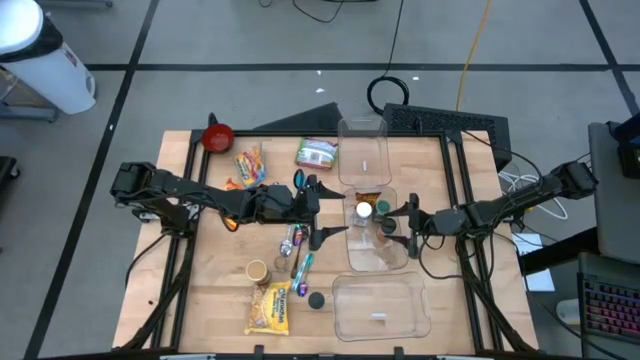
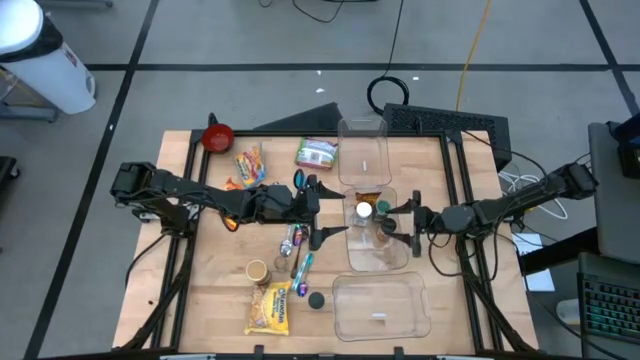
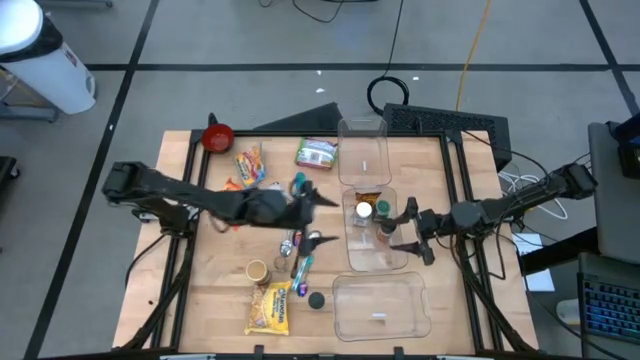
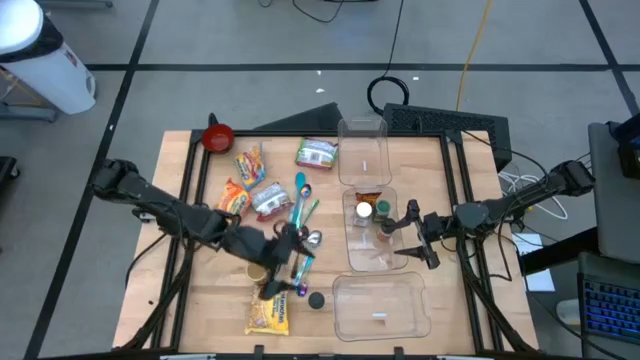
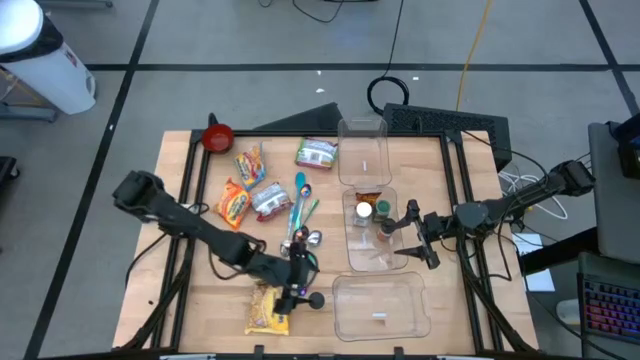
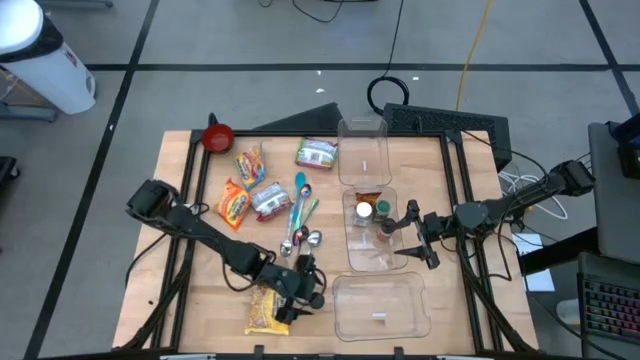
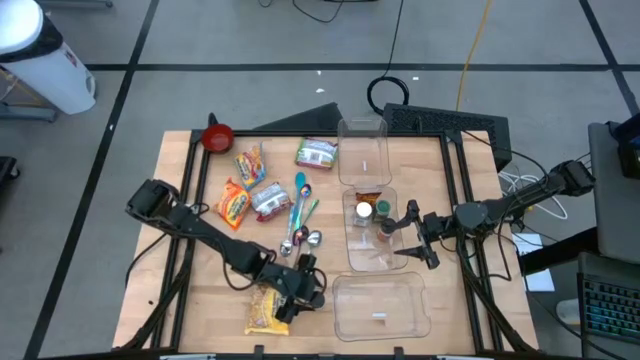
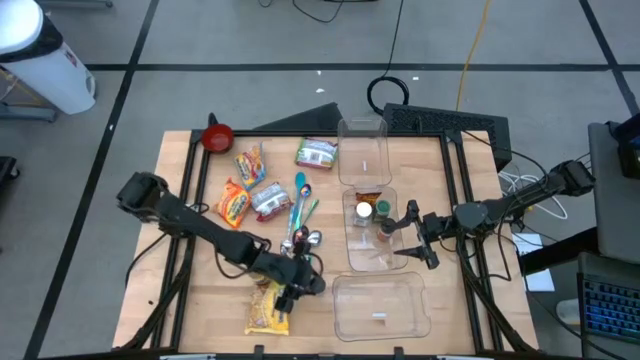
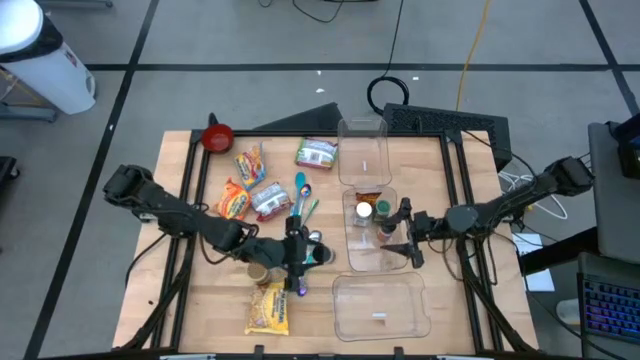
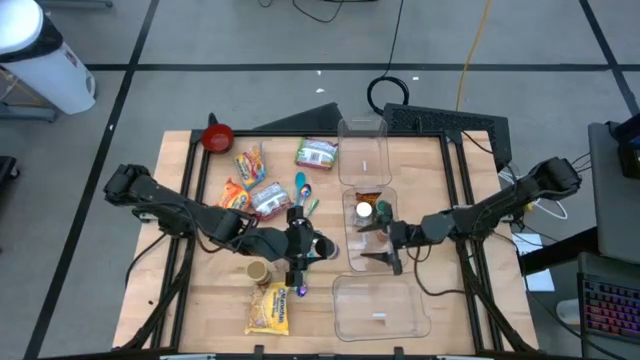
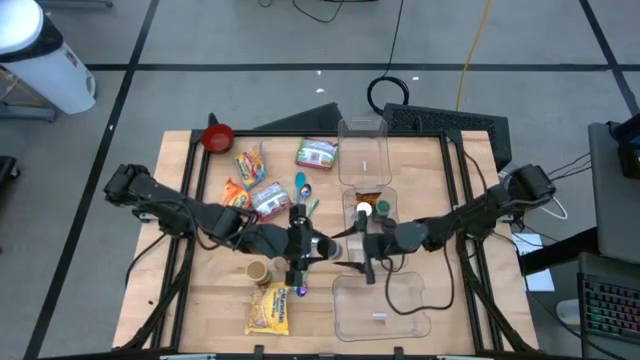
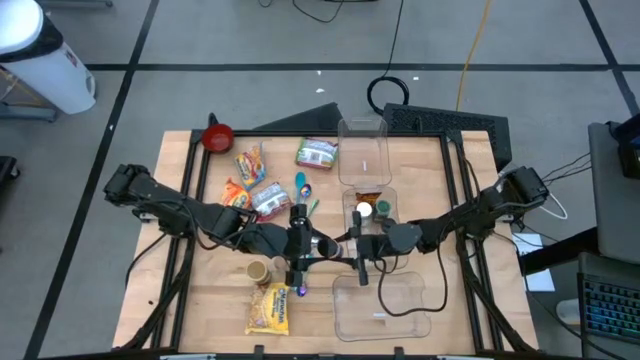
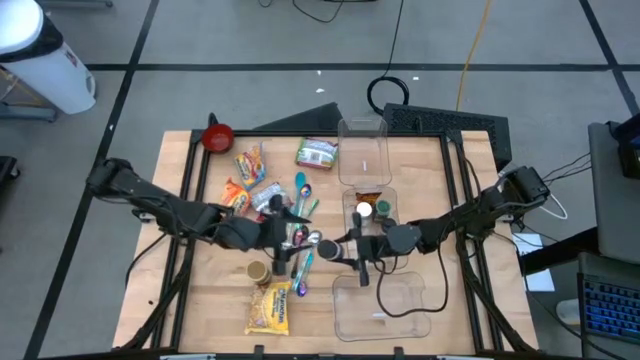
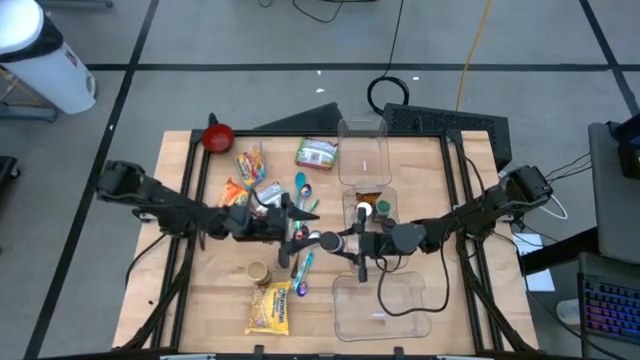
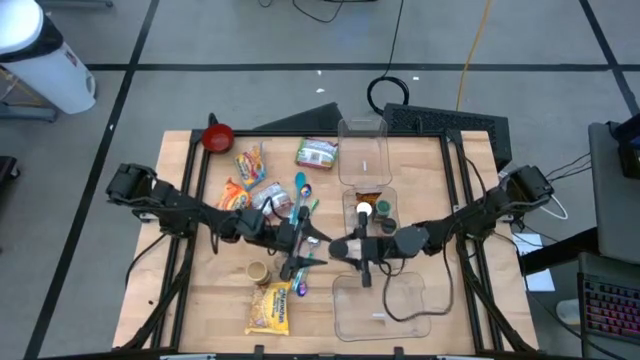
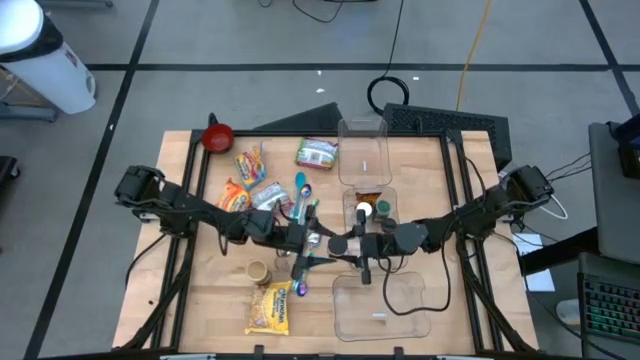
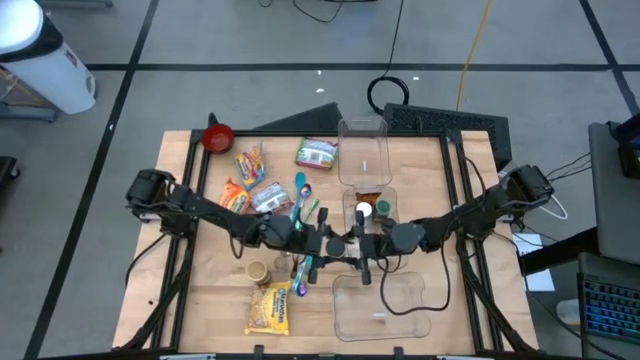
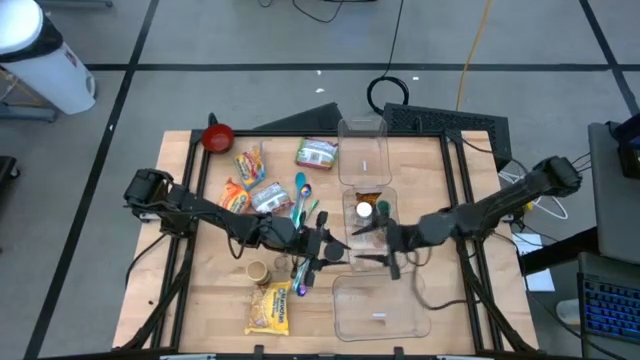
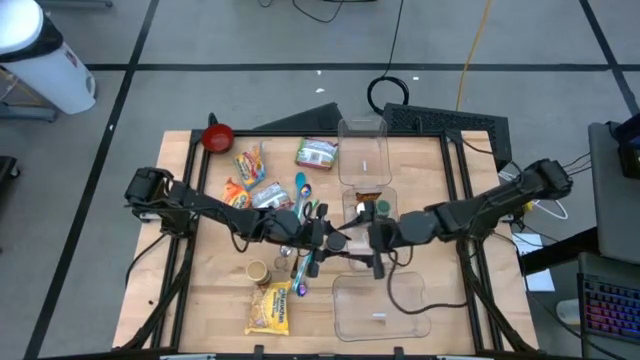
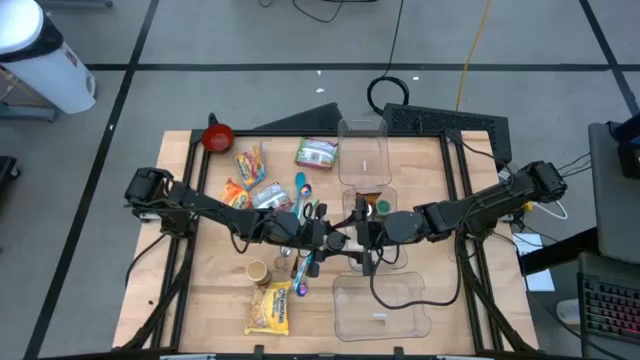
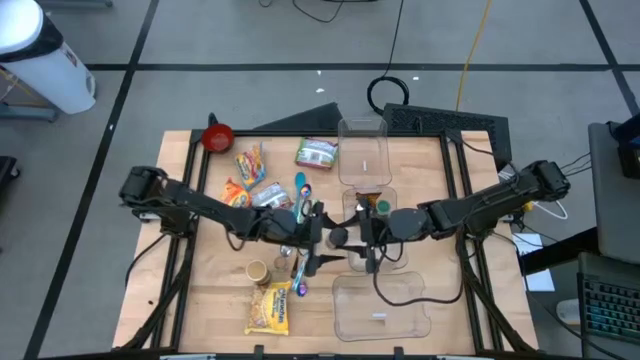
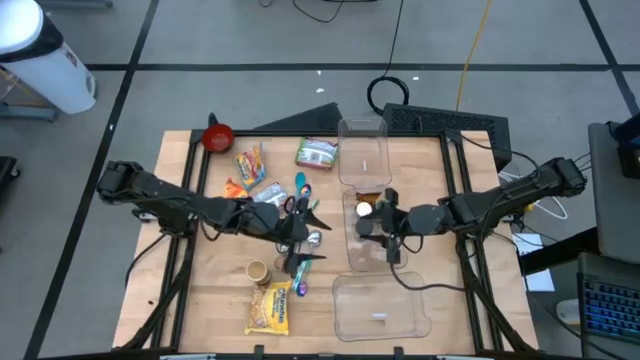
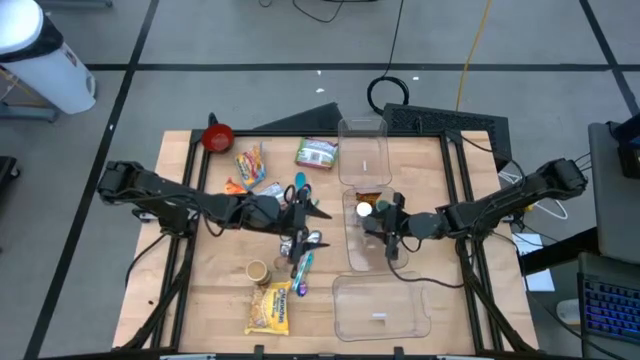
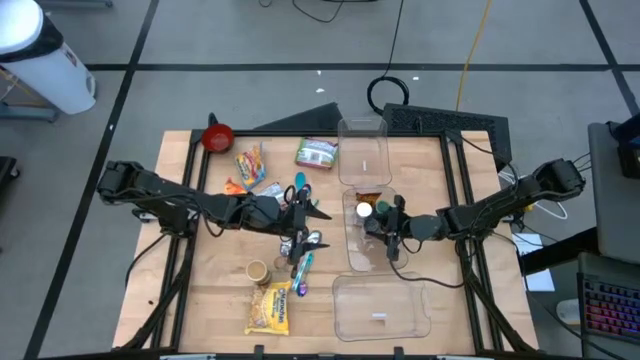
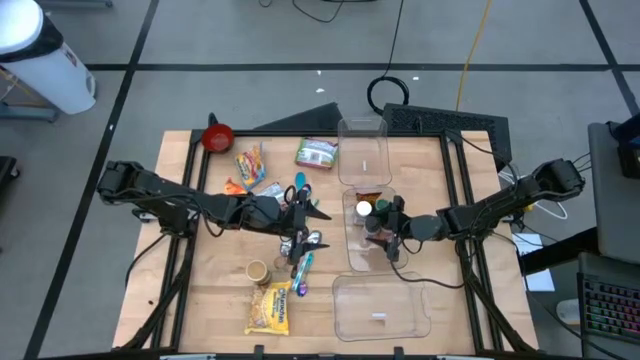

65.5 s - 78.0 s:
Task: Pick & Place Food Item
Put the purple seasoning bottle into the middle transparent bin

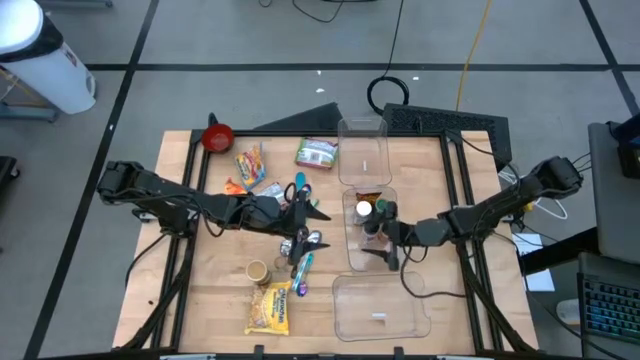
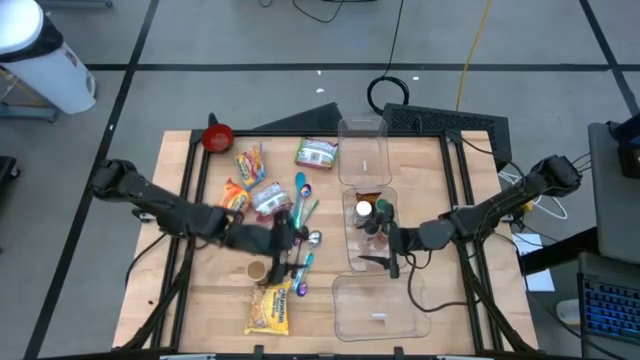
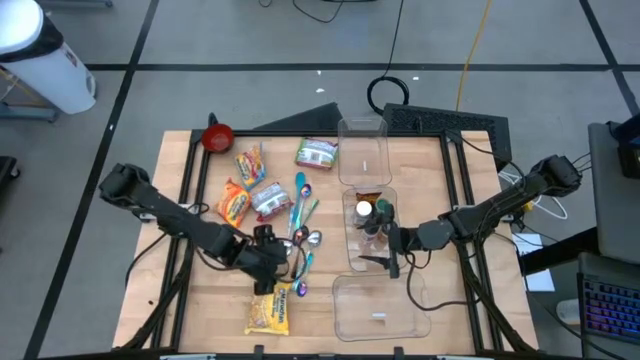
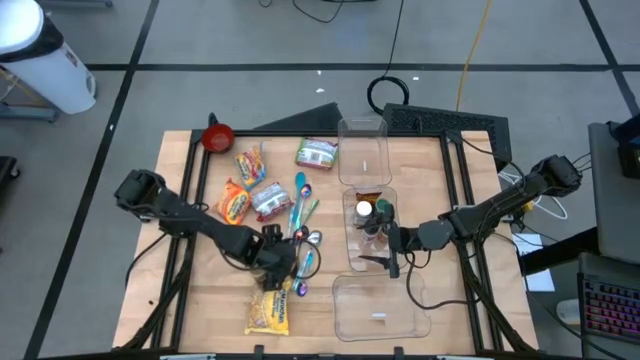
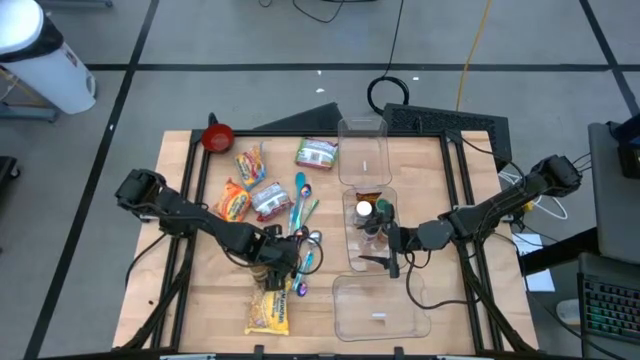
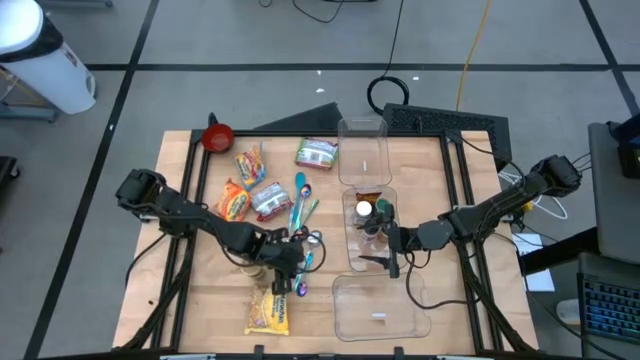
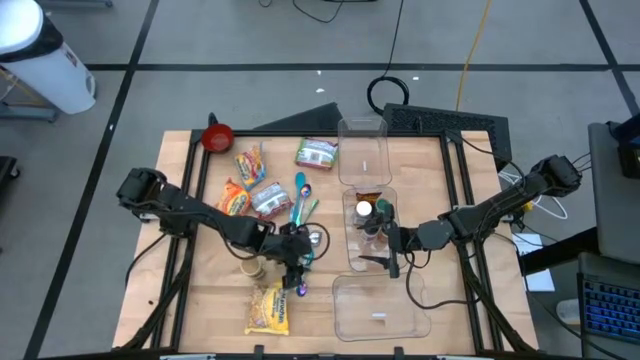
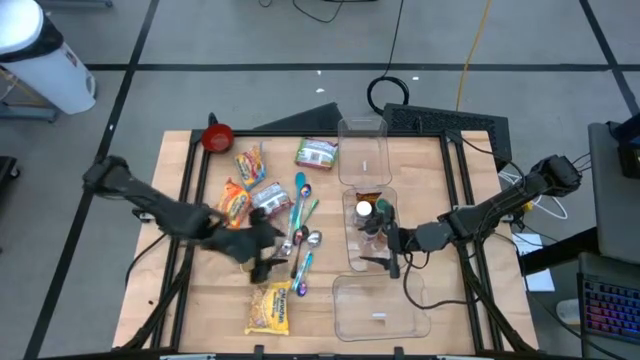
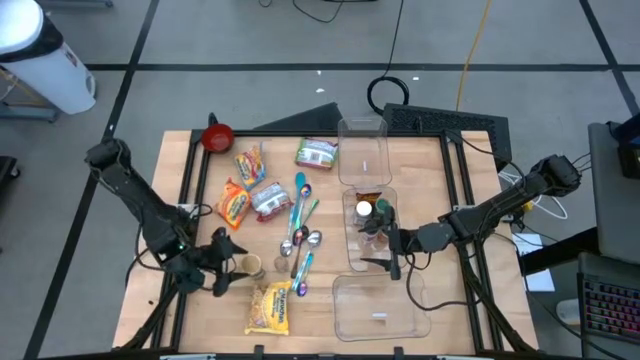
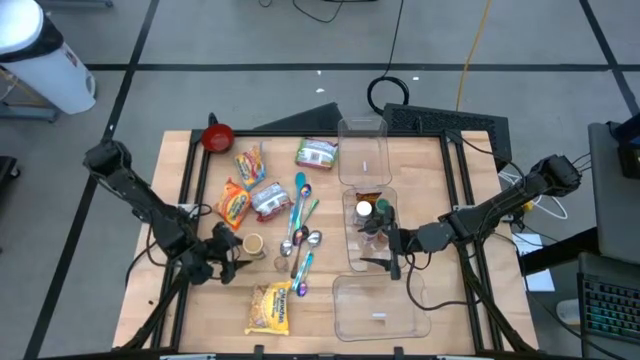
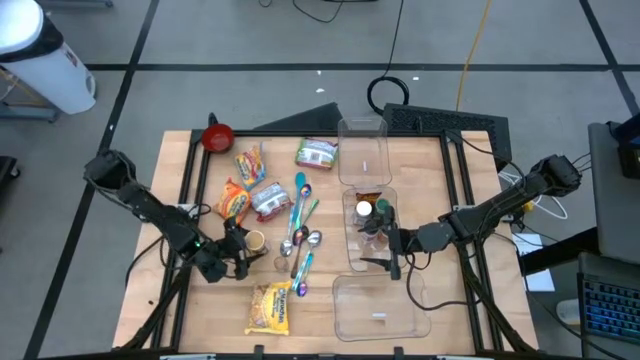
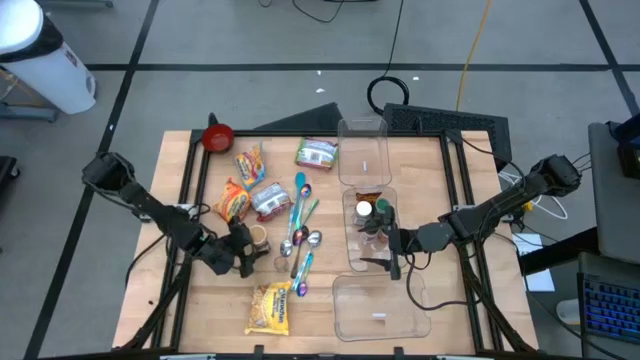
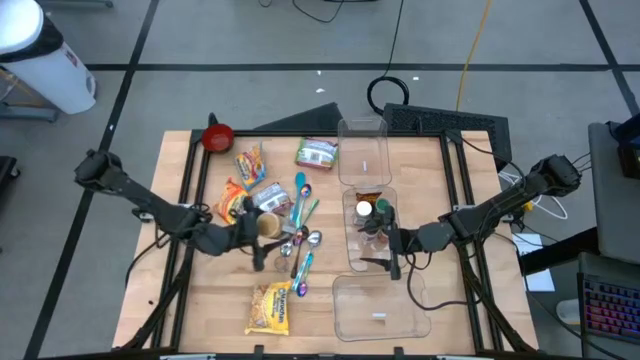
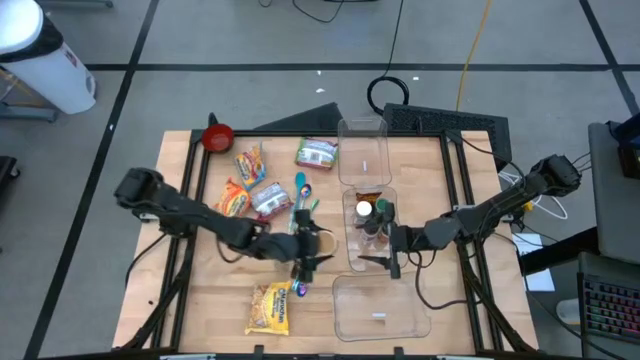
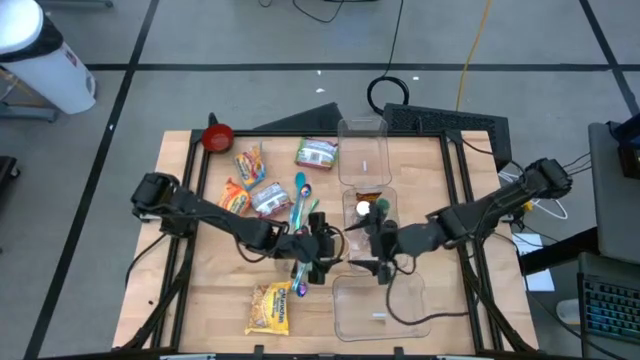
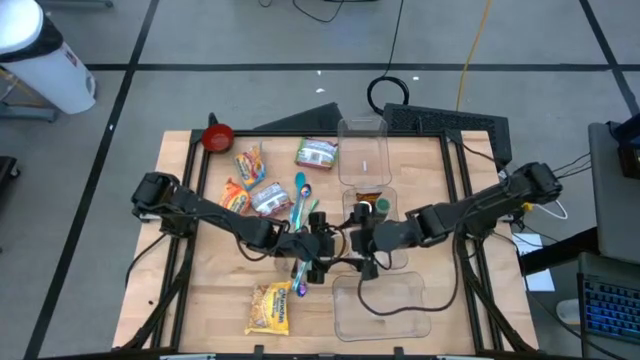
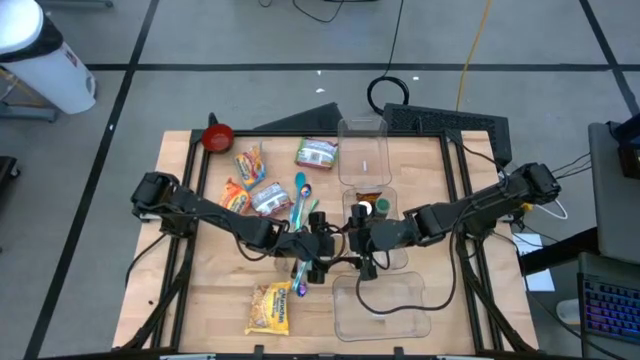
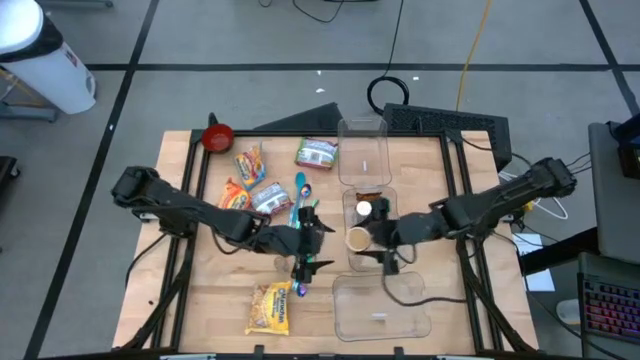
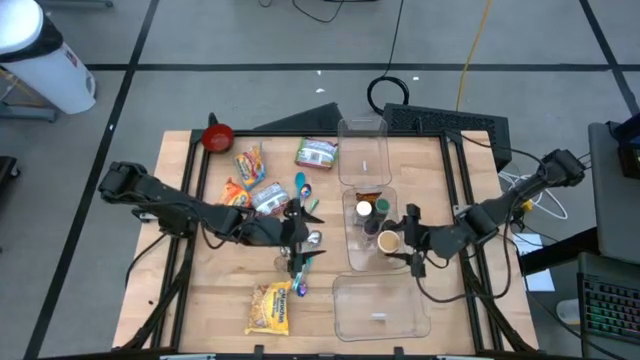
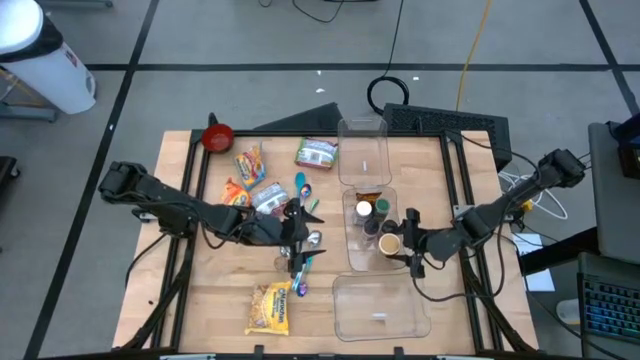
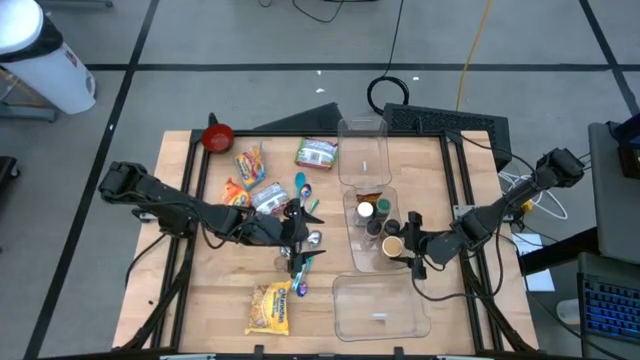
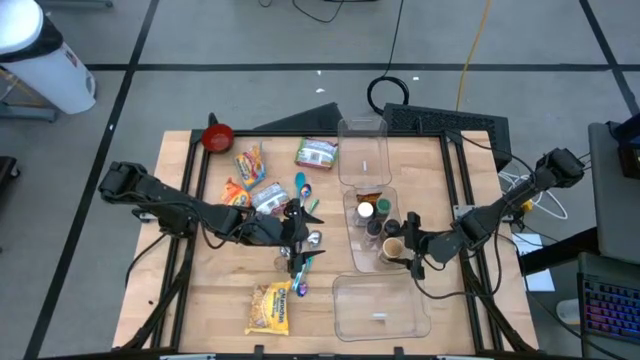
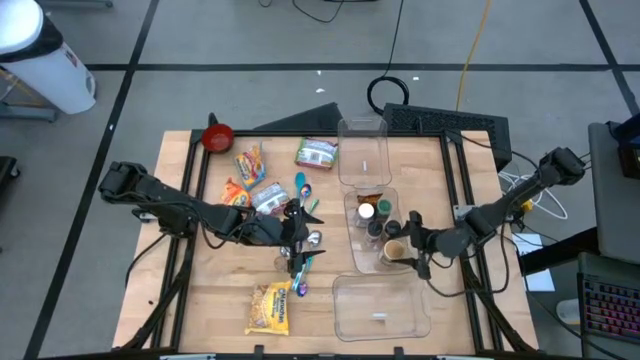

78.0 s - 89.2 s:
Put the gold seasoning bottle into the middle transparent bin
